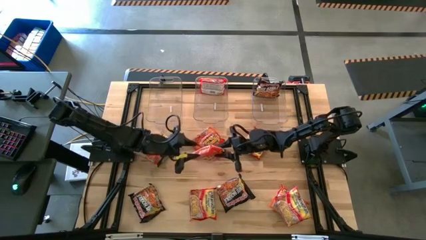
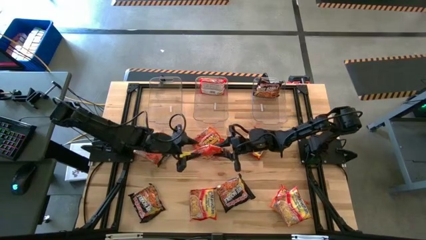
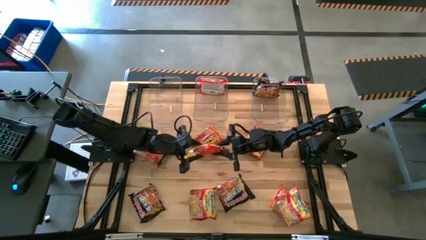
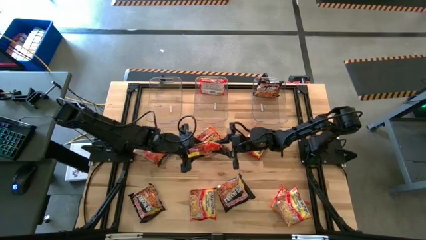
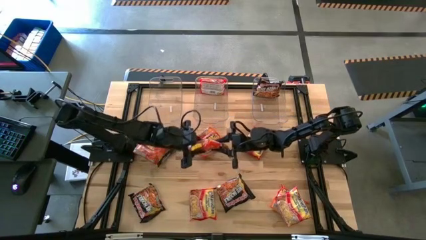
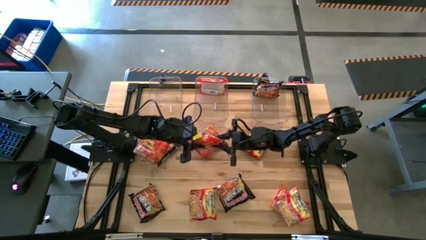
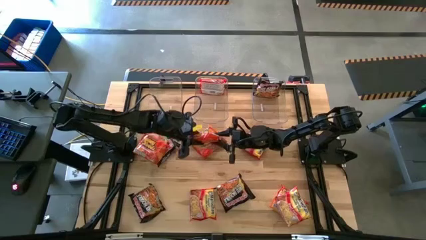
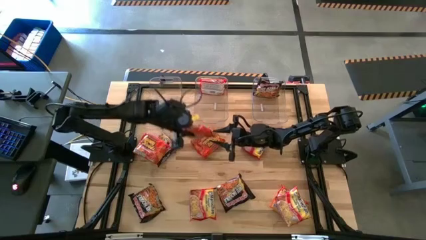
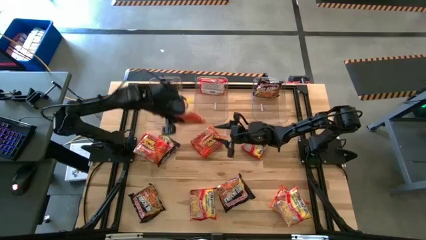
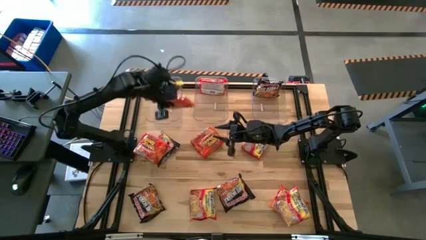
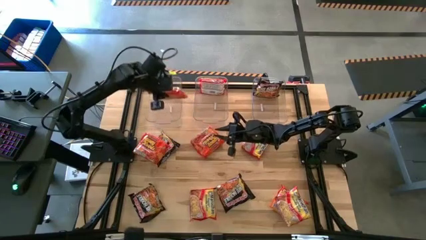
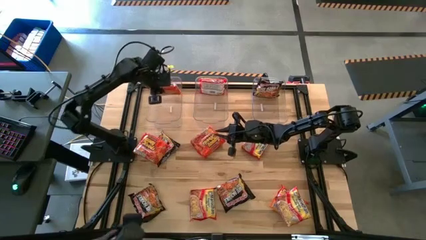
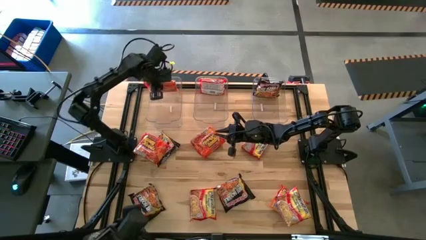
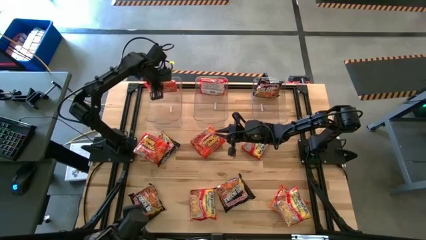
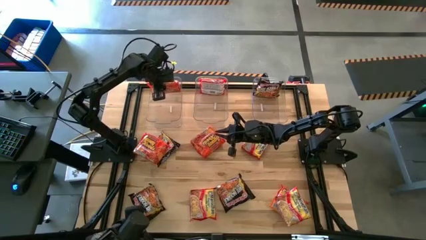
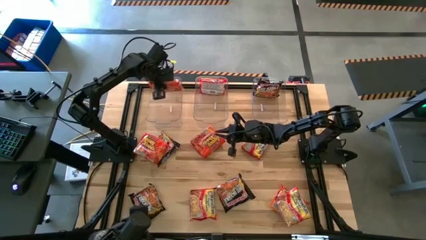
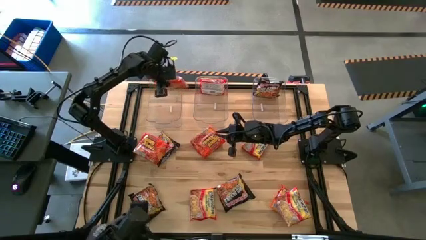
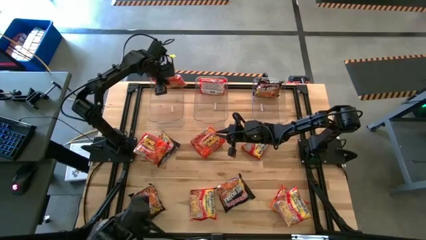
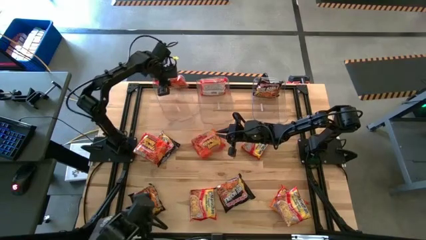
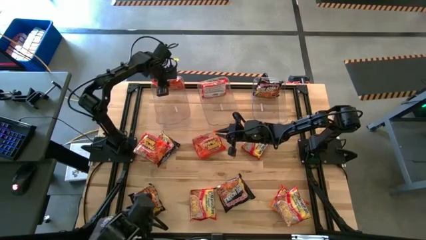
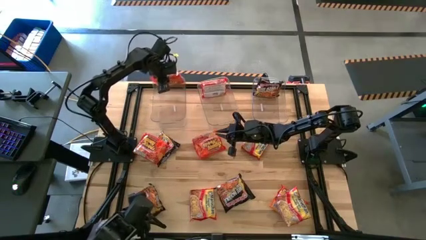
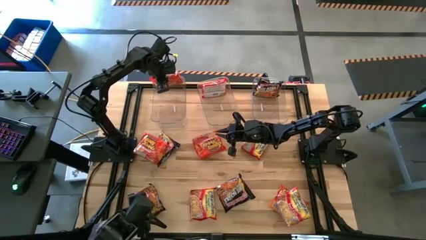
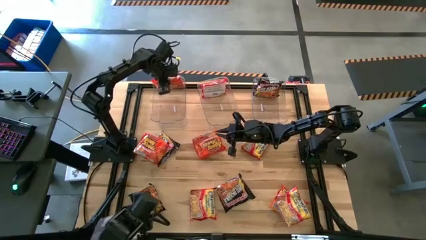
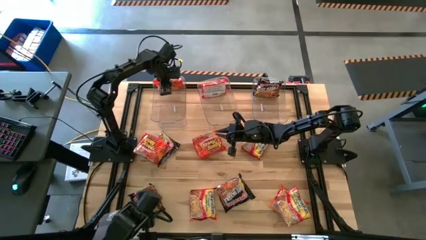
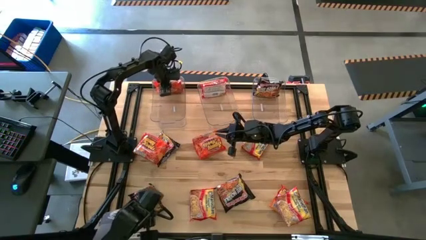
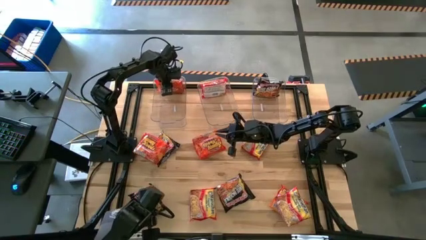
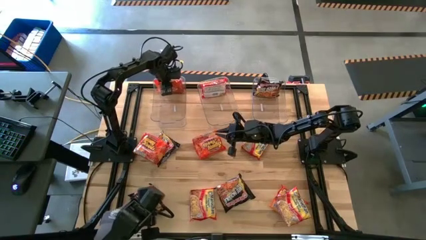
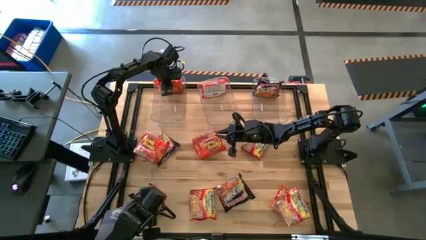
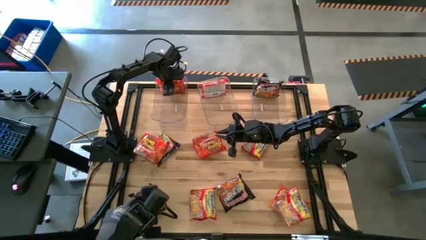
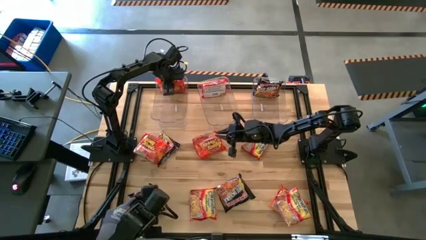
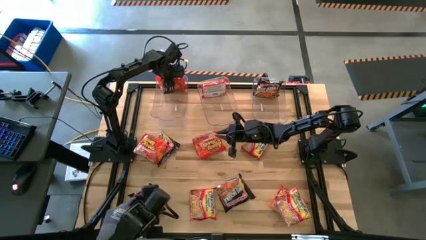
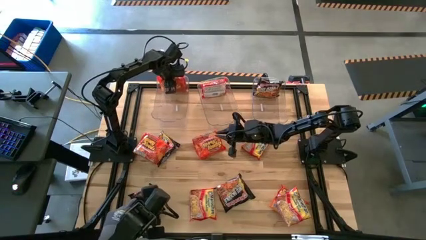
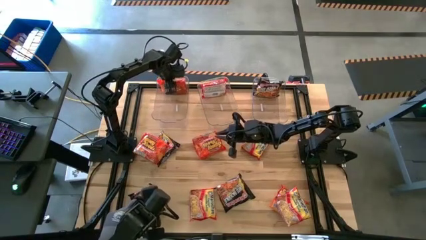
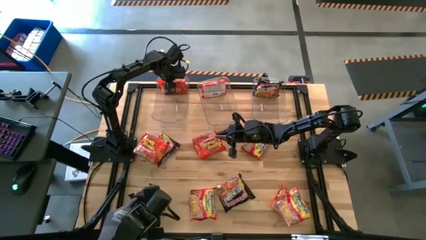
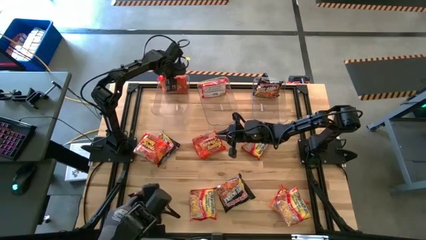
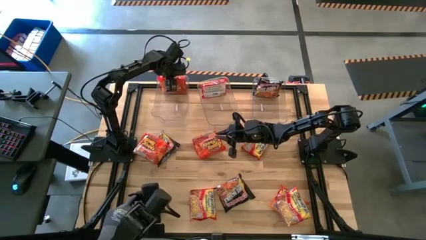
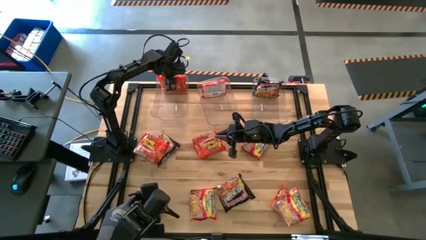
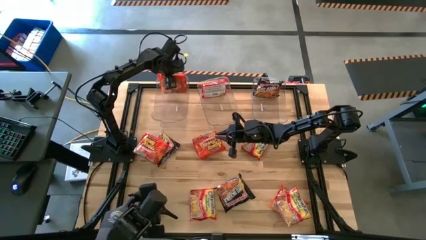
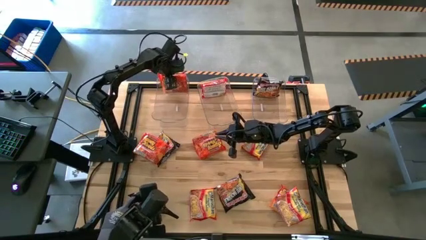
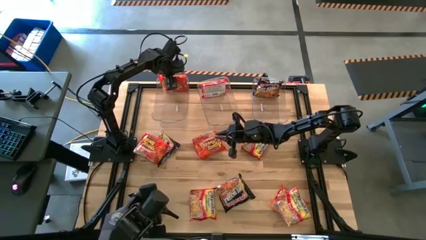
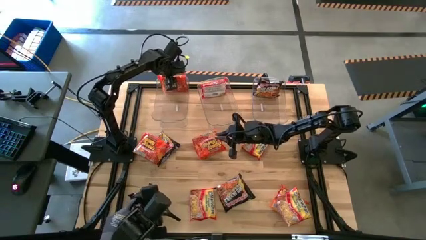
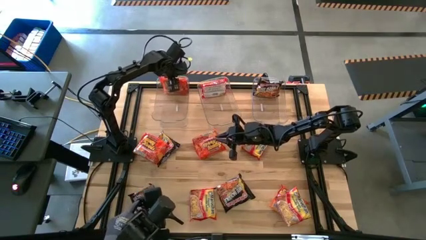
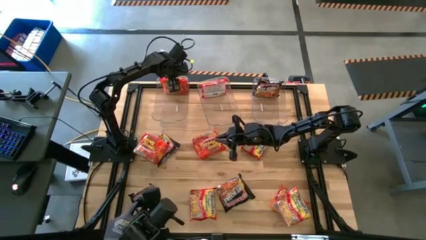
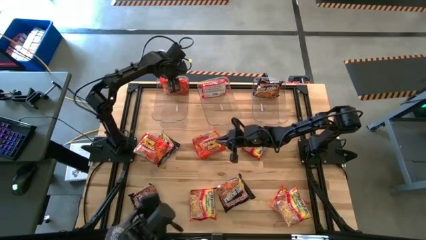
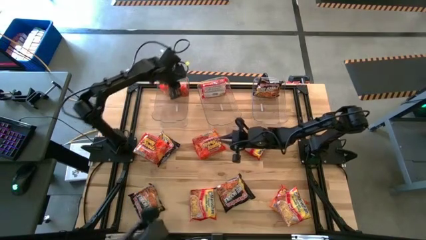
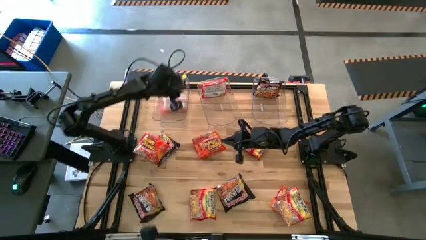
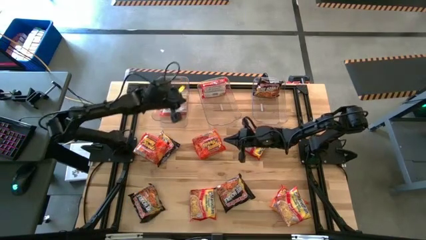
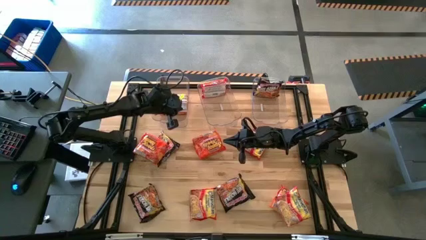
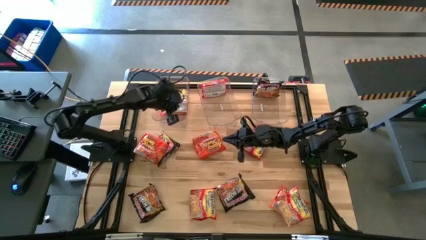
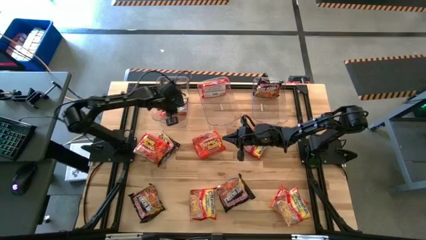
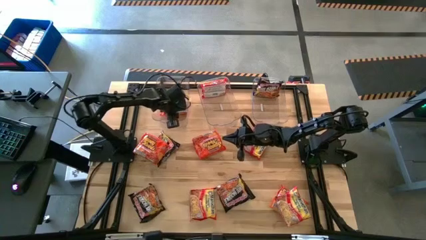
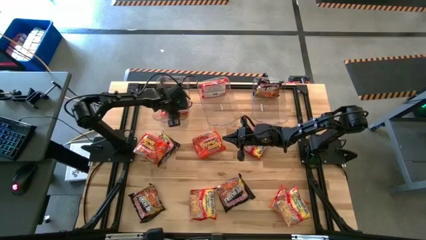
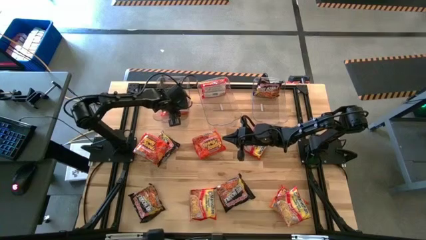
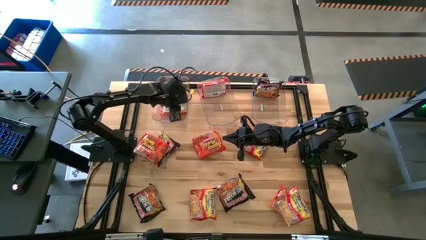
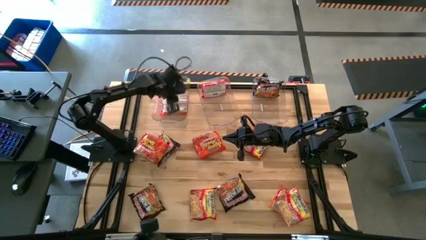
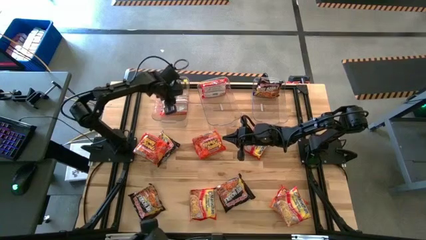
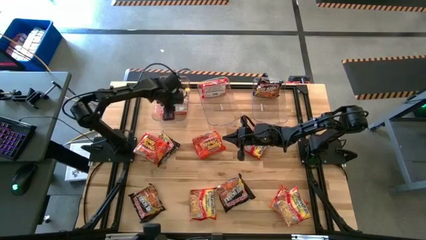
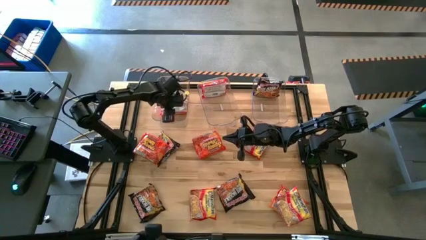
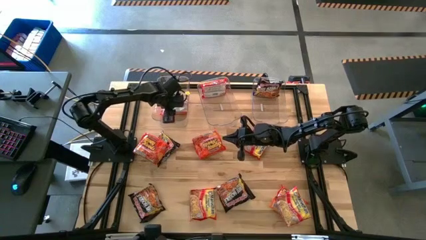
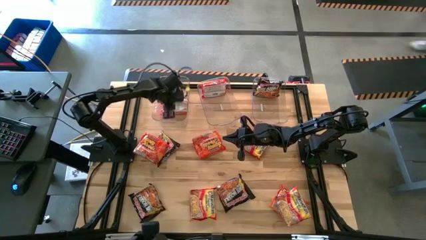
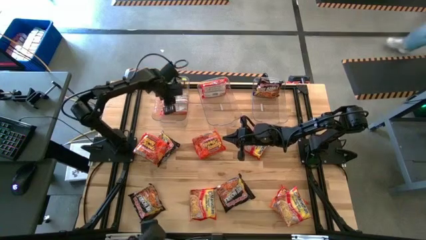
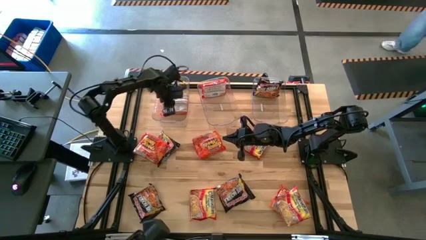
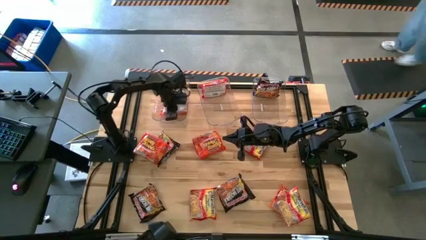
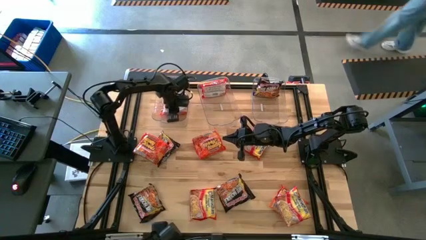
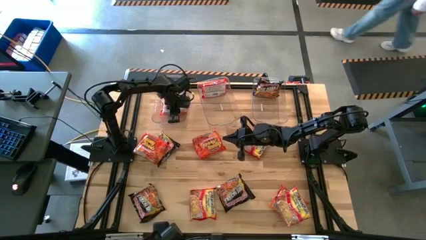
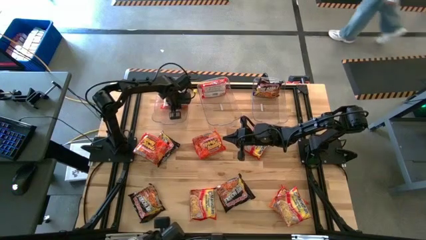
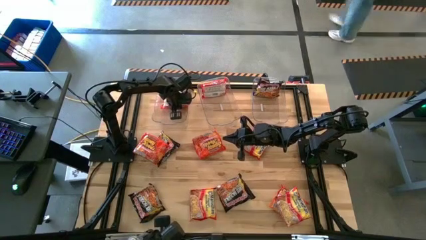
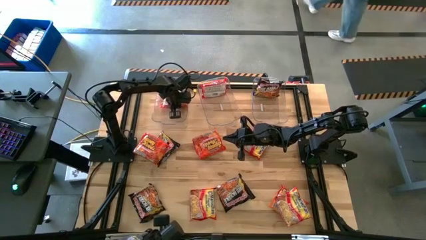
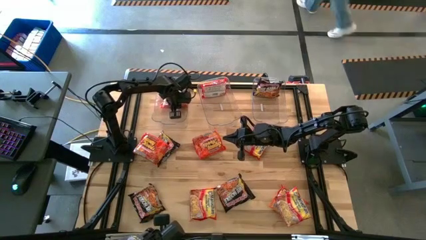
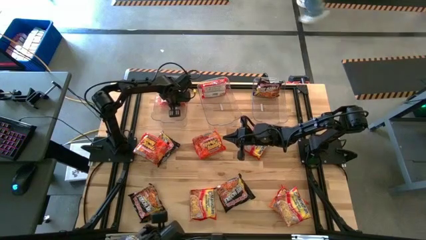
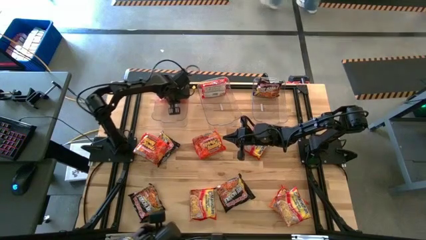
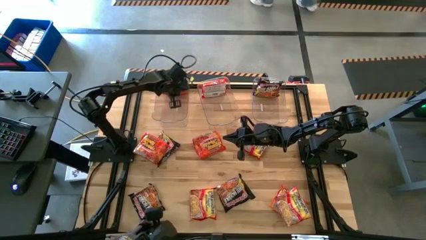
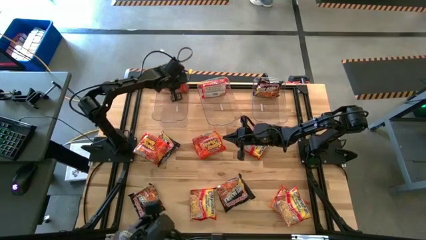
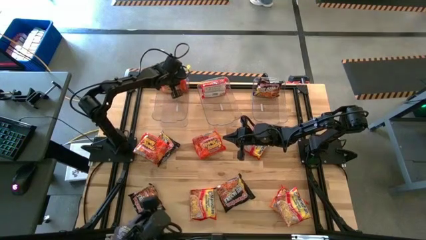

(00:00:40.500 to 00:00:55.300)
Task: Sort Maruchan noodles
Put the orange noodle pack into the left transparent bin
